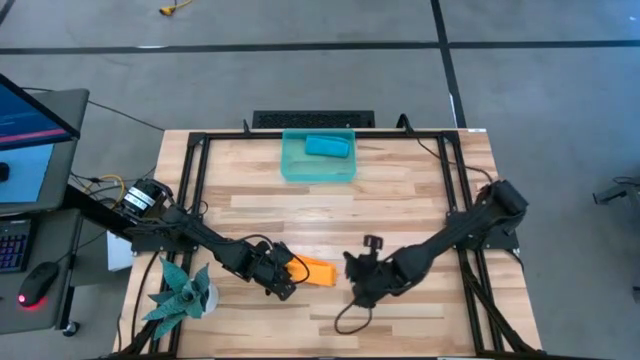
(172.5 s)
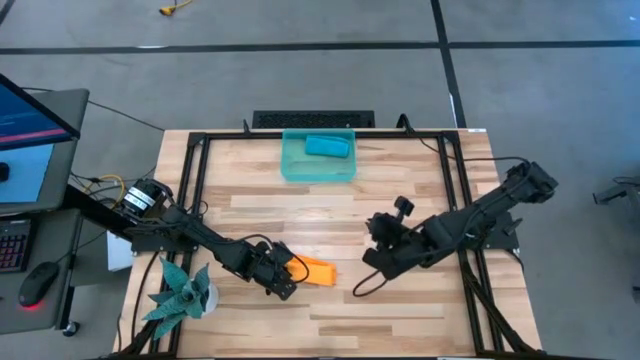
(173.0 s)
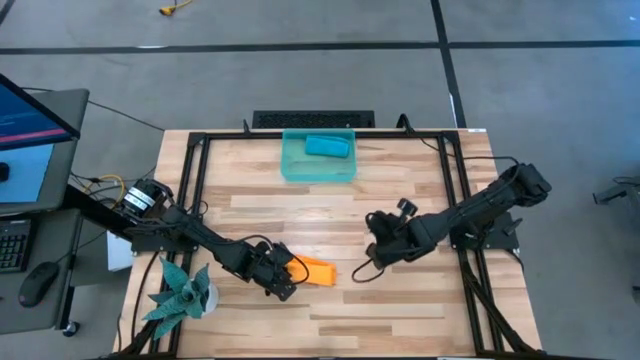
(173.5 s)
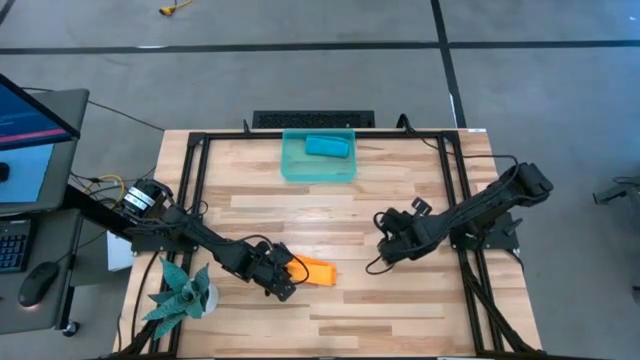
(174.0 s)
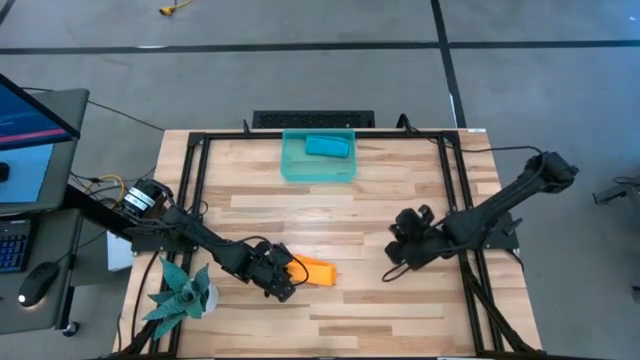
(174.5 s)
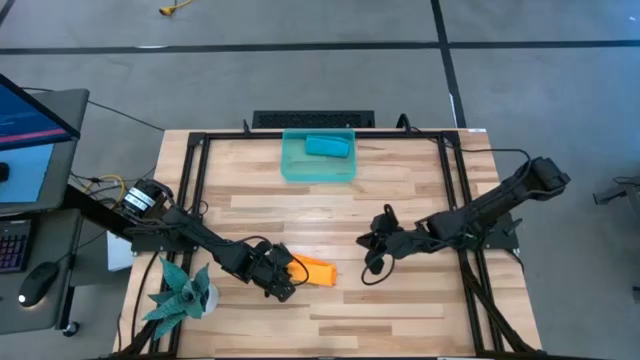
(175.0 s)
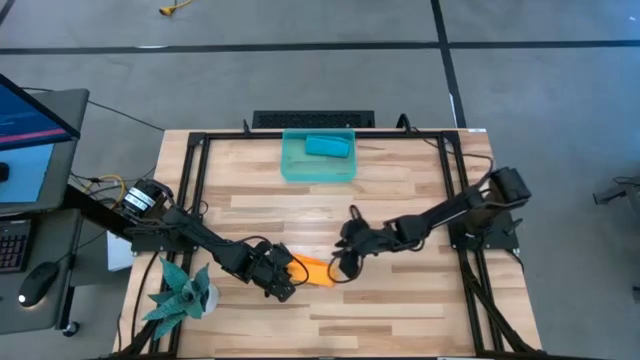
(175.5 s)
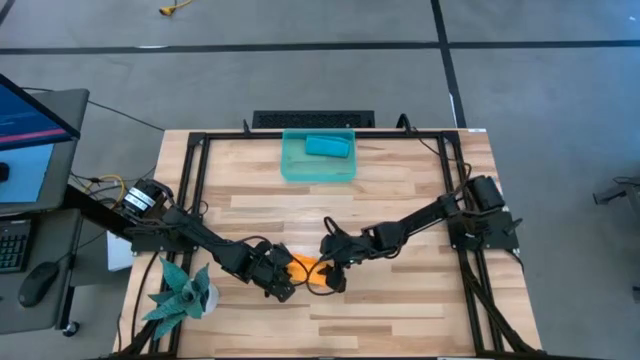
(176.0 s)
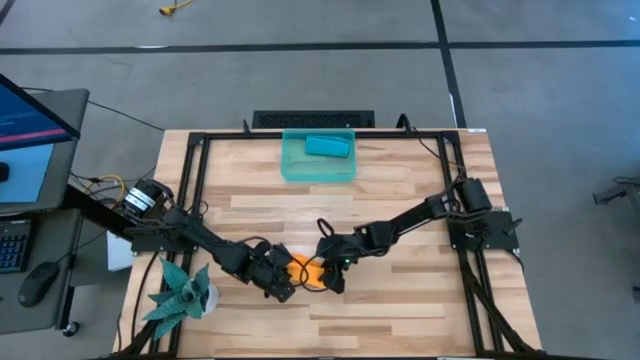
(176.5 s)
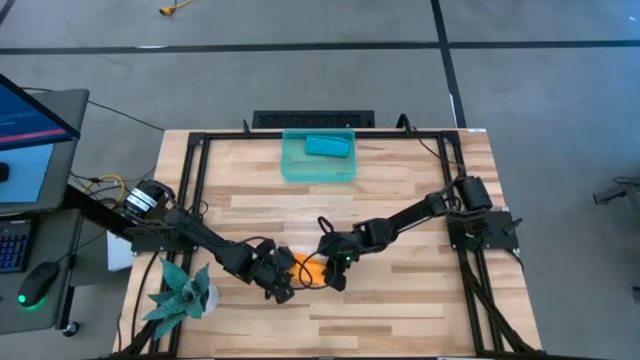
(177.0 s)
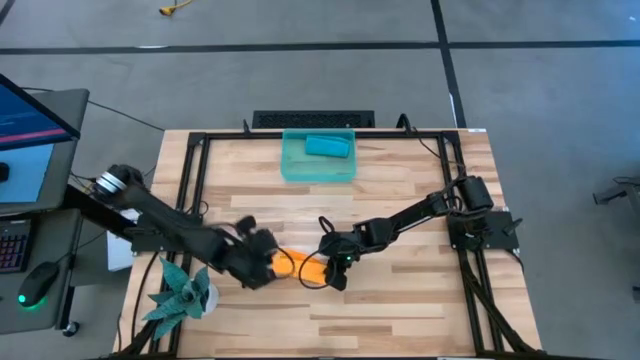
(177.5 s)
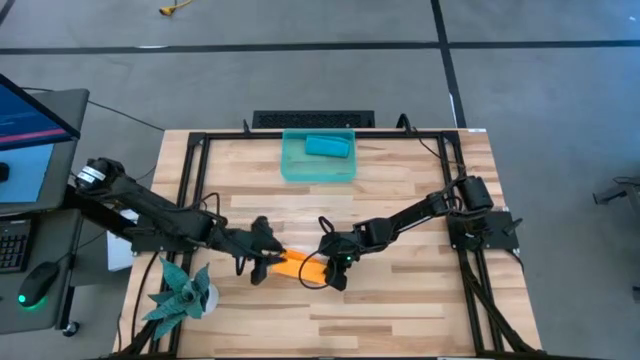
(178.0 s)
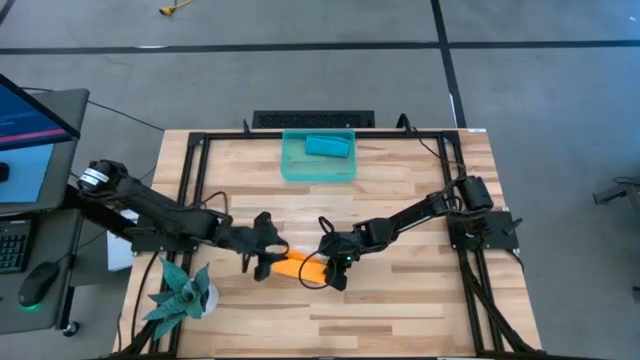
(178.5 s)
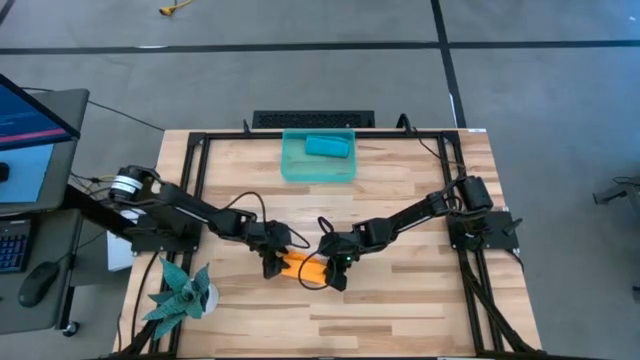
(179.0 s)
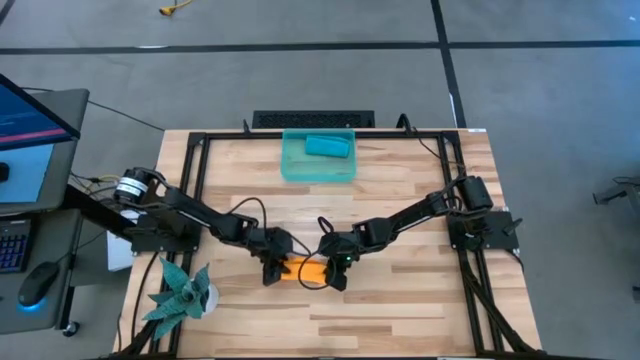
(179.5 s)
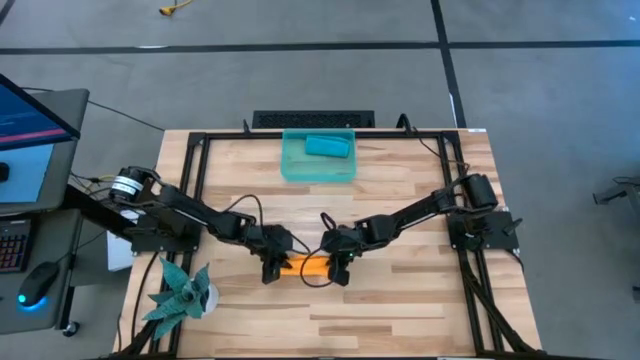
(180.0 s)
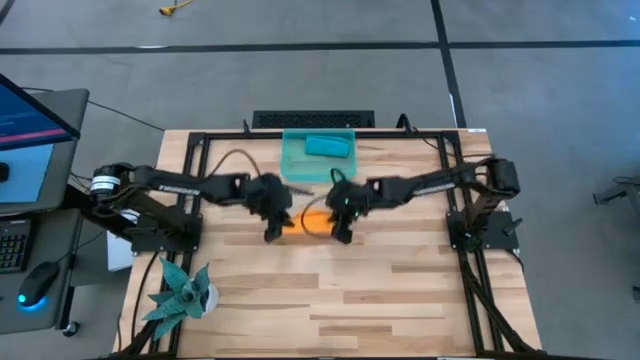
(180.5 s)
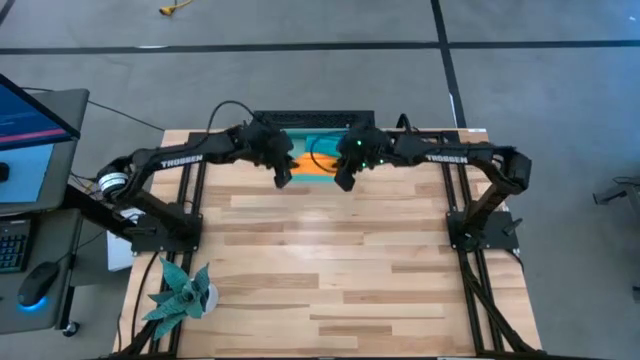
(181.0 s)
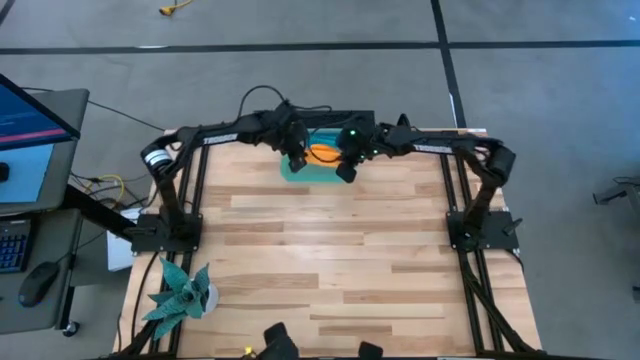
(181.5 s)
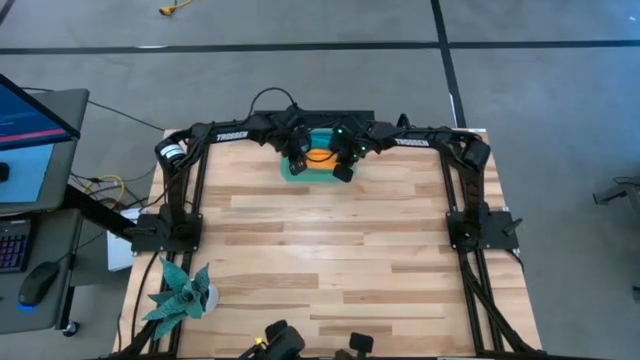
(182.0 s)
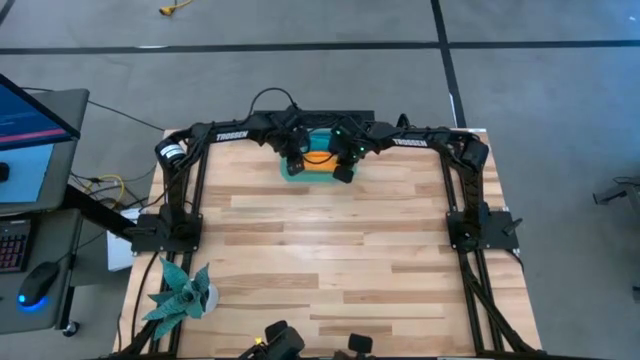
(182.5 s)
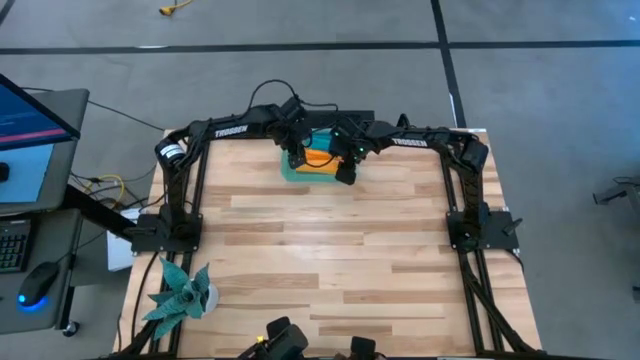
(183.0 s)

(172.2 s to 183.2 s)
Task: Roll microfiber towels into tight, uniform cylinder then place into a basket
Put the rolled yellow microfiber cloth into the blue bin

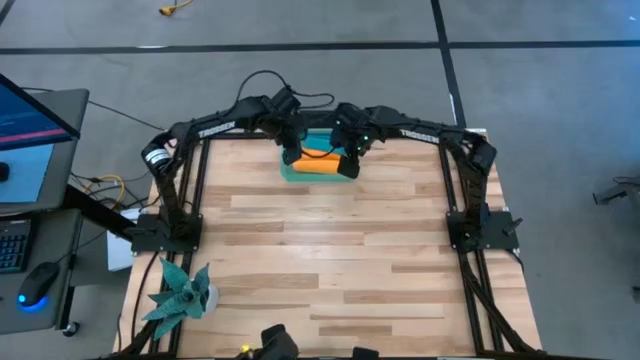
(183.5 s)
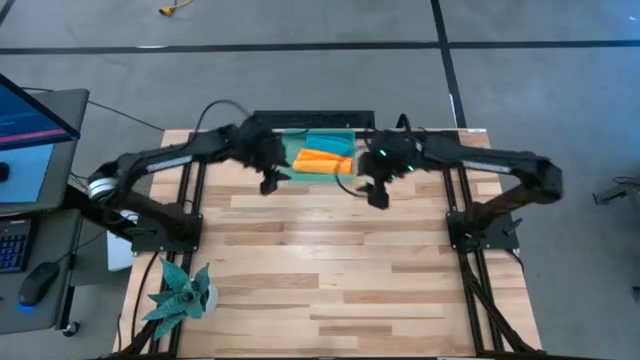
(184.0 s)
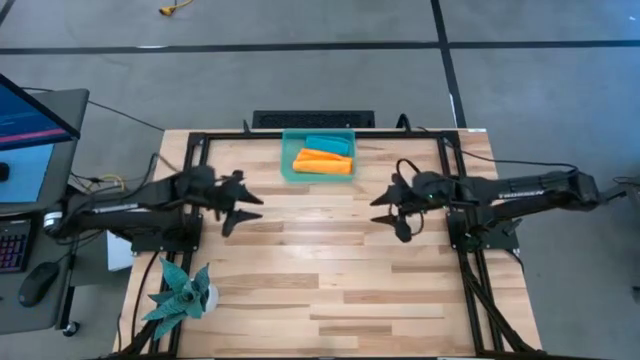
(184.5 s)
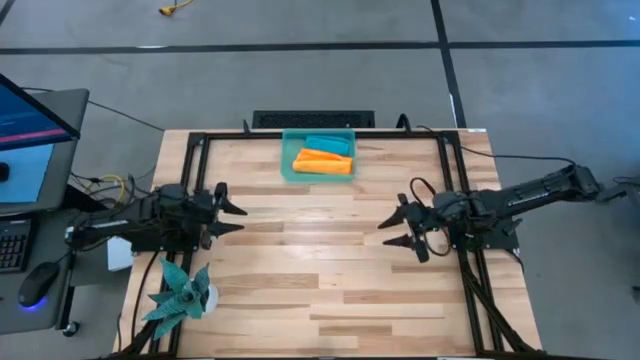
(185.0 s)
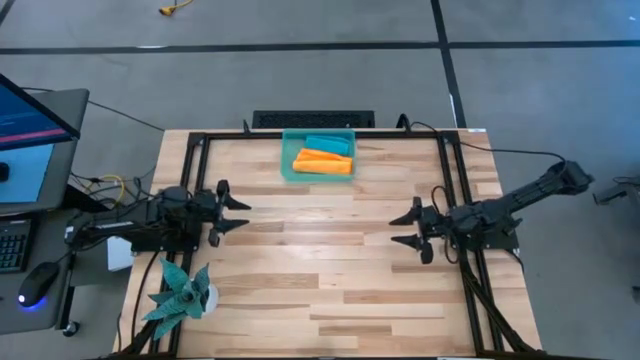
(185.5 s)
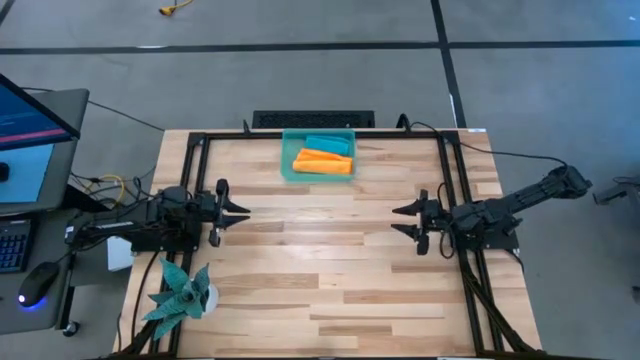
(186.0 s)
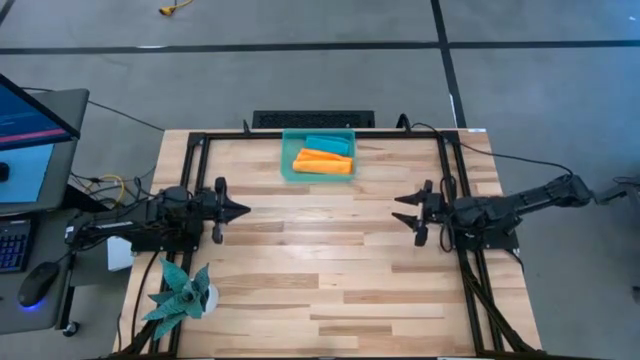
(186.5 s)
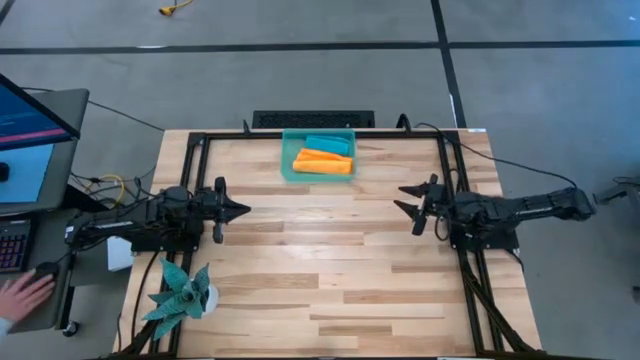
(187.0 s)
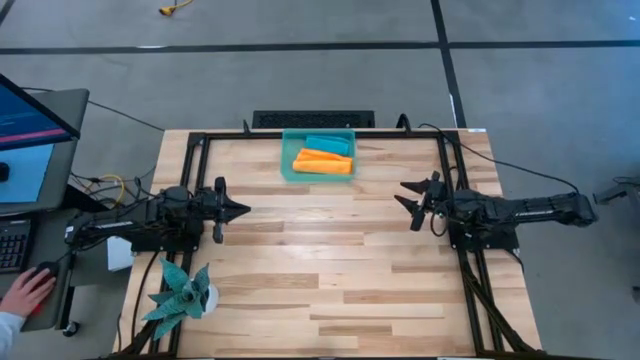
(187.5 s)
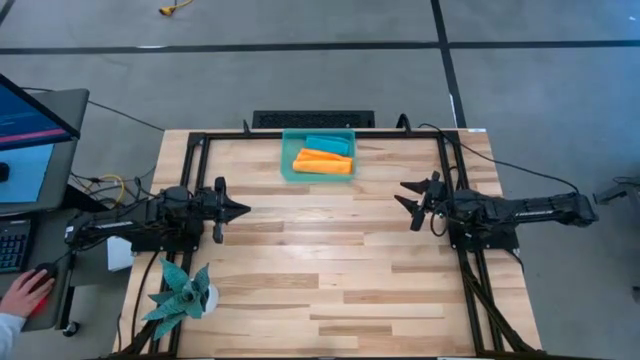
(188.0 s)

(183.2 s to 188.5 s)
Return to Home Position

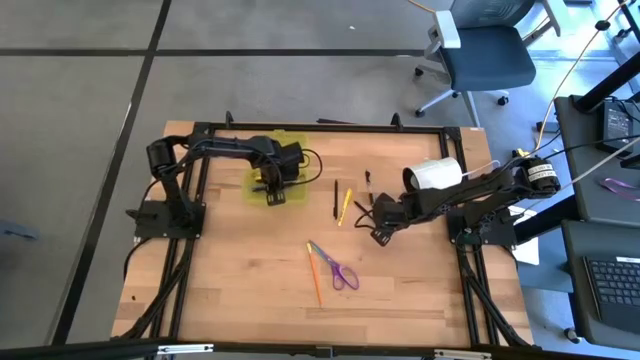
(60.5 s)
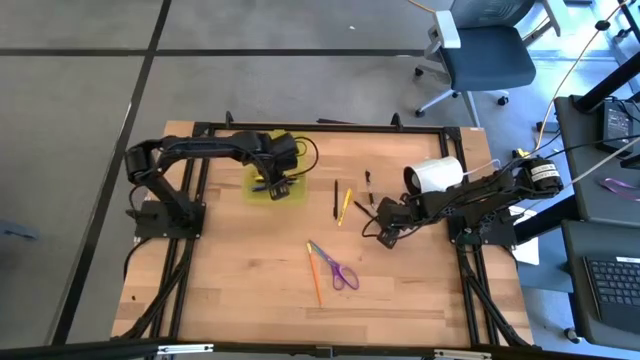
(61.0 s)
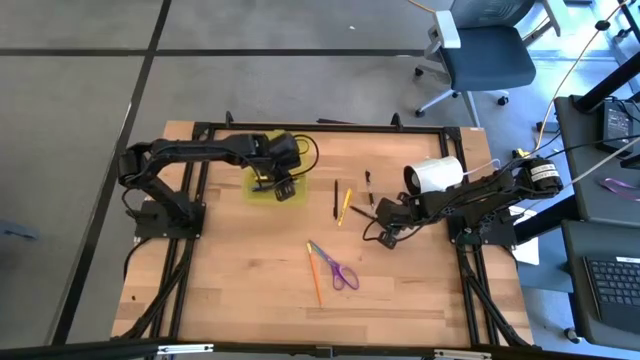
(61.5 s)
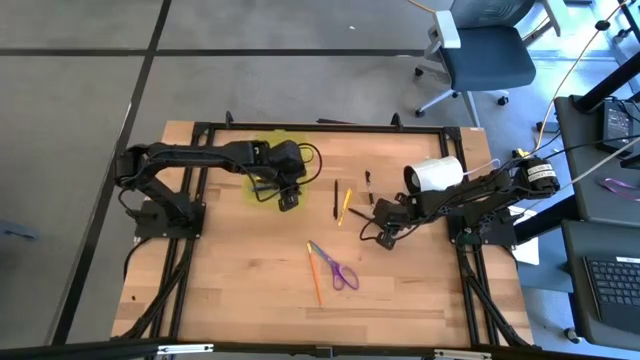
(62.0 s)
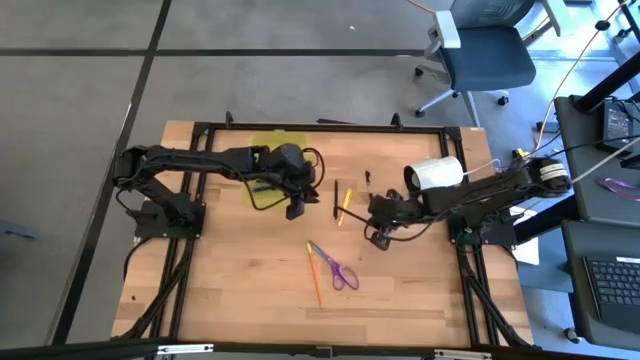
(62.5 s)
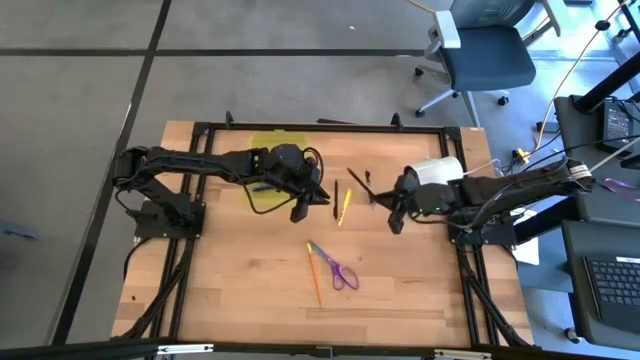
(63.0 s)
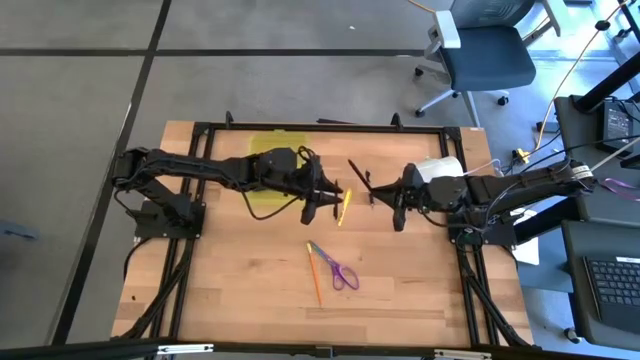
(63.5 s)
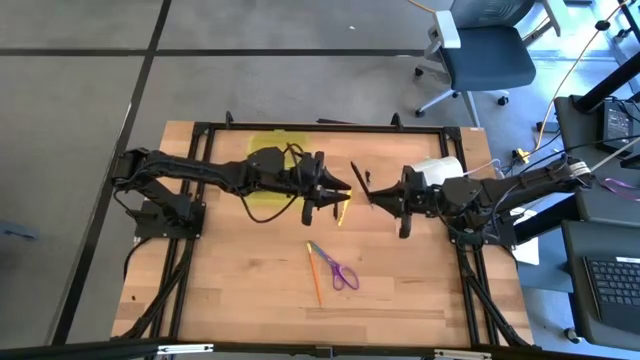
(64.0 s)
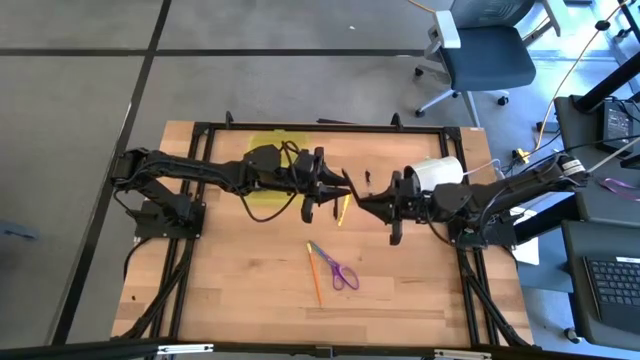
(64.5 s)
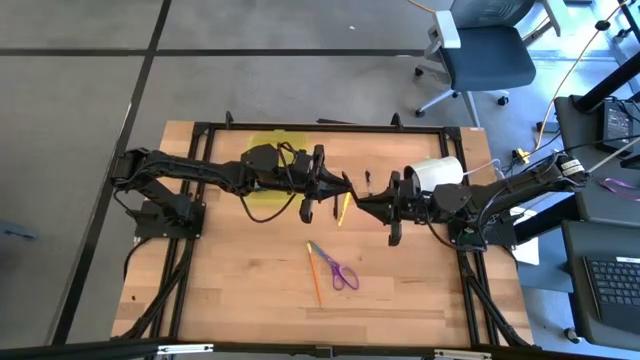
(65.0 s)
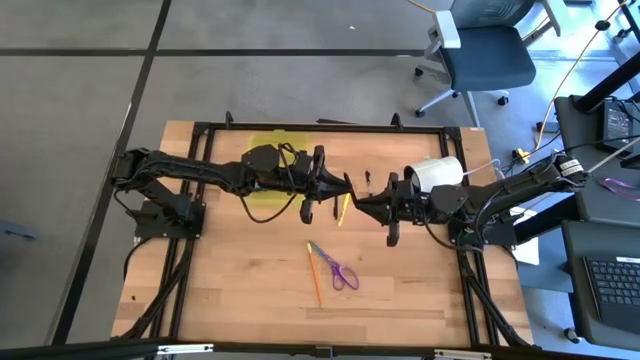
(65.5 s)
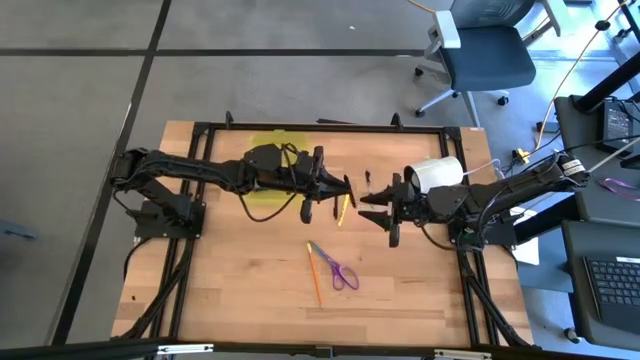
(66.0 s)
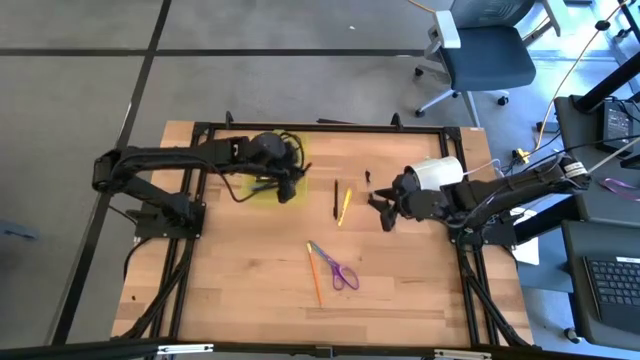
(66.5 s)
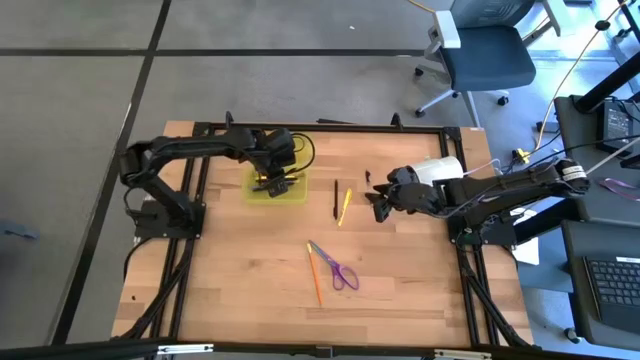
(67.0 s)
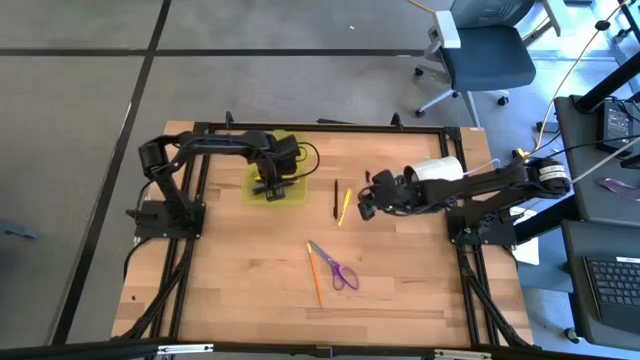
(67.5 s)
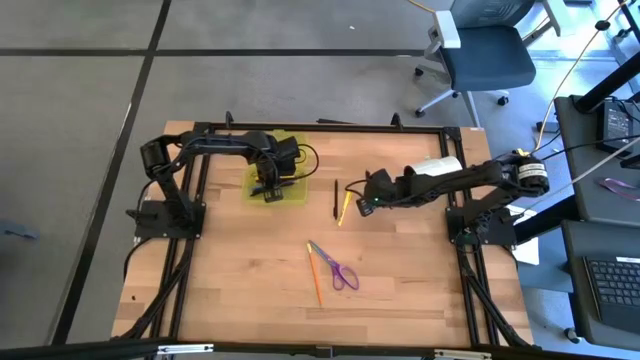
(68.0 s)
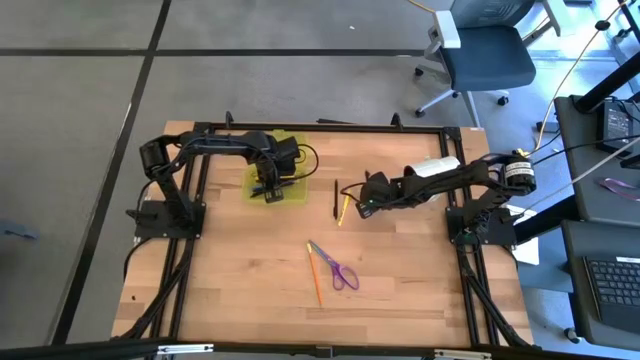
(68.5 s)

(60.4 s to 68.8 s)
Task: Pick & place school supplies into a supply box
Put the black pen into the yellow supply box
